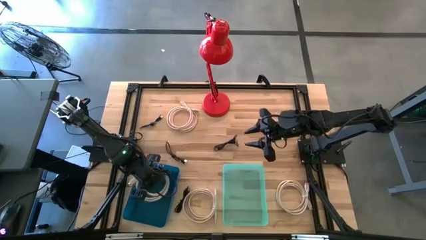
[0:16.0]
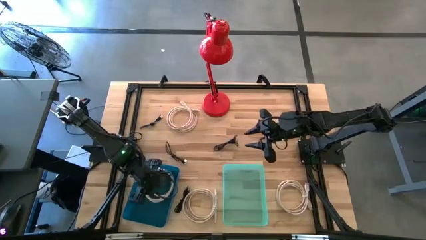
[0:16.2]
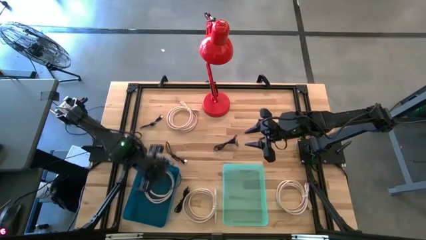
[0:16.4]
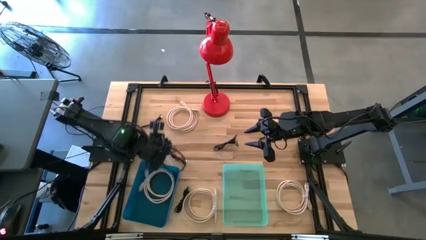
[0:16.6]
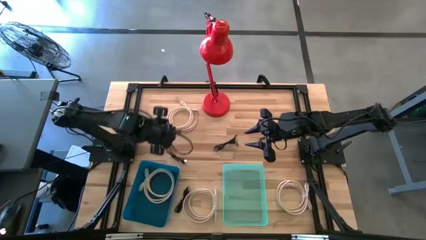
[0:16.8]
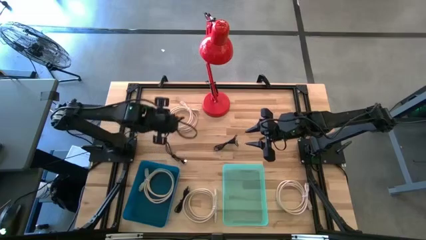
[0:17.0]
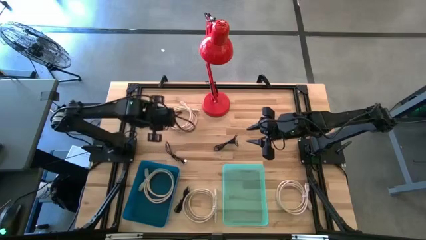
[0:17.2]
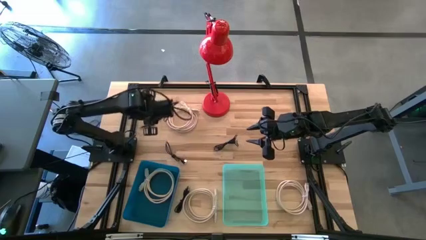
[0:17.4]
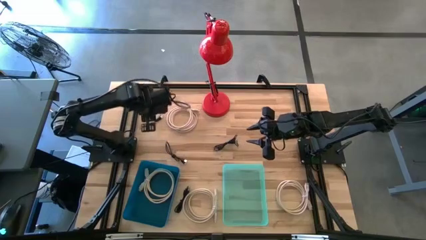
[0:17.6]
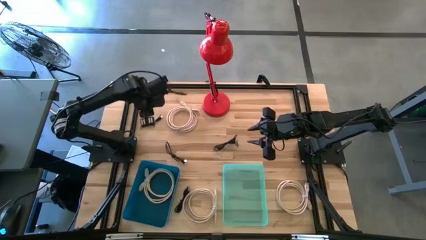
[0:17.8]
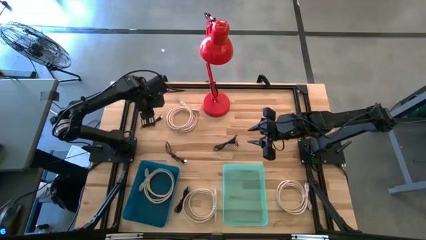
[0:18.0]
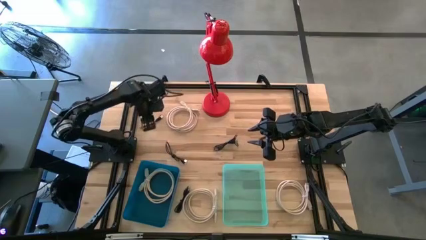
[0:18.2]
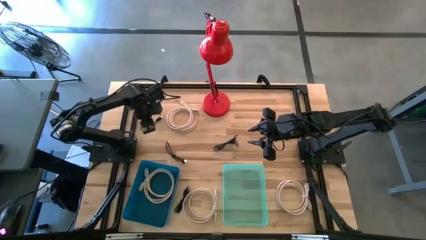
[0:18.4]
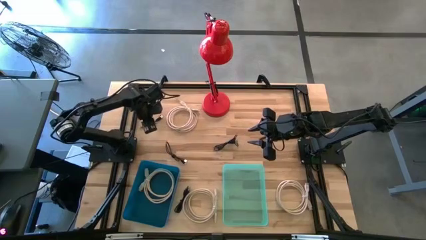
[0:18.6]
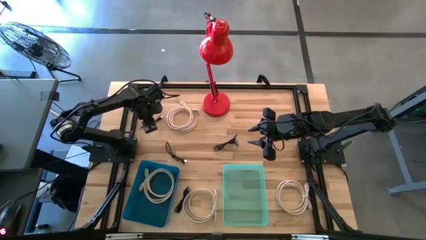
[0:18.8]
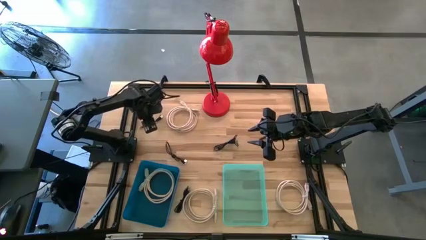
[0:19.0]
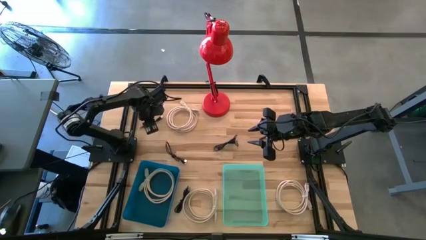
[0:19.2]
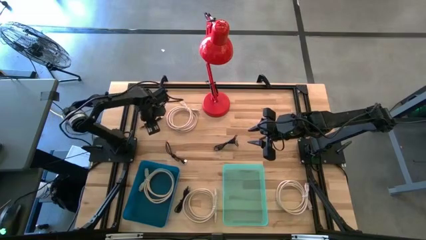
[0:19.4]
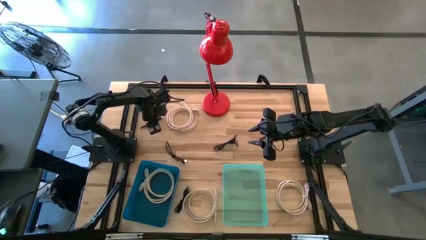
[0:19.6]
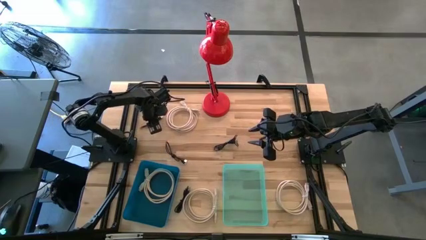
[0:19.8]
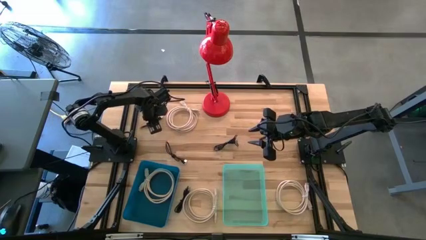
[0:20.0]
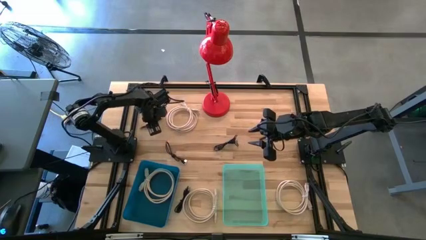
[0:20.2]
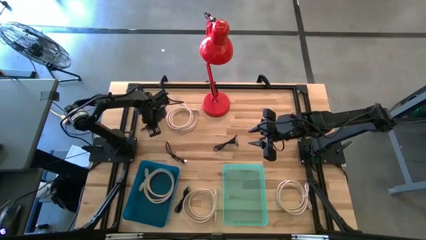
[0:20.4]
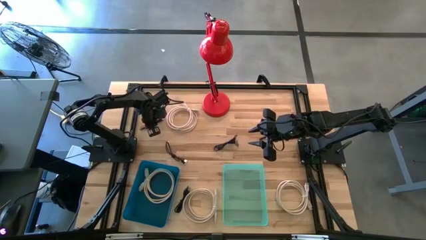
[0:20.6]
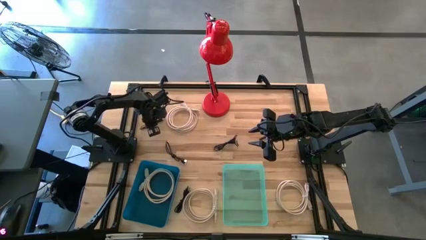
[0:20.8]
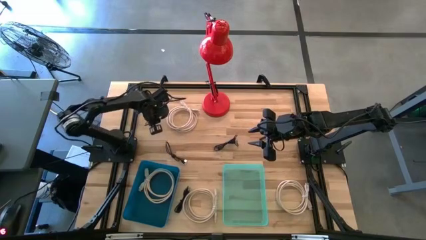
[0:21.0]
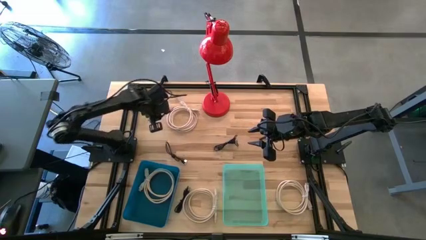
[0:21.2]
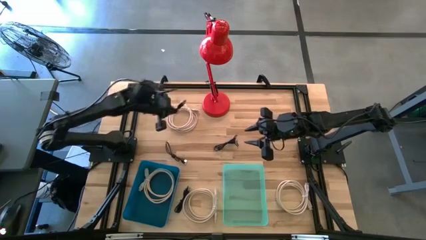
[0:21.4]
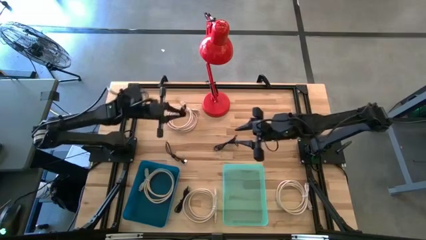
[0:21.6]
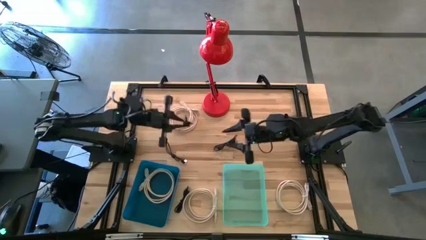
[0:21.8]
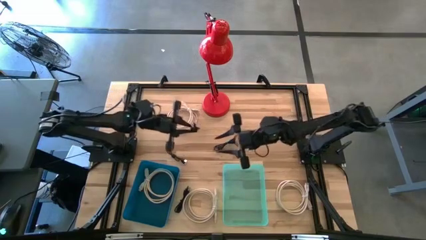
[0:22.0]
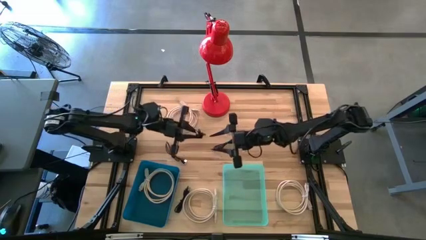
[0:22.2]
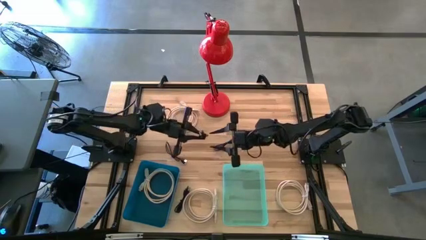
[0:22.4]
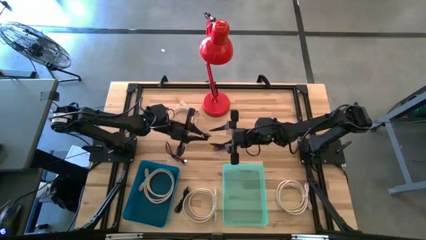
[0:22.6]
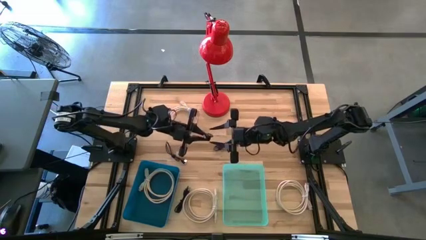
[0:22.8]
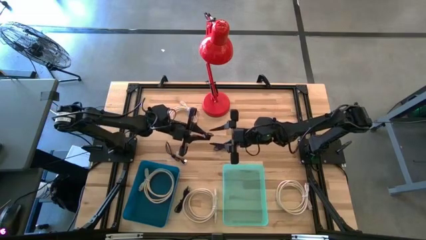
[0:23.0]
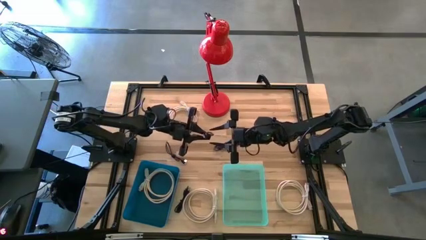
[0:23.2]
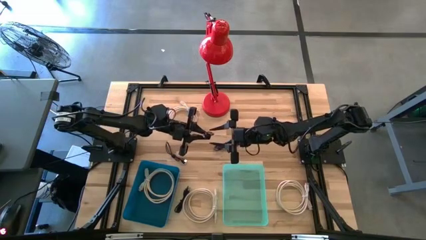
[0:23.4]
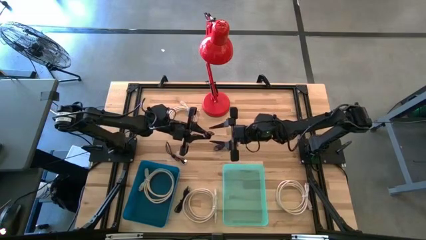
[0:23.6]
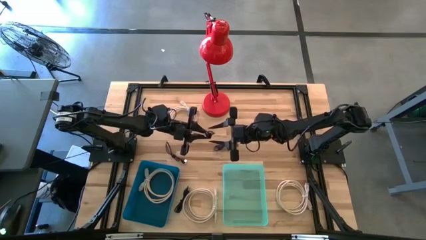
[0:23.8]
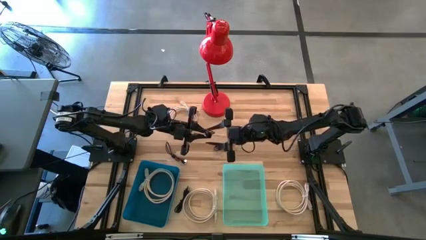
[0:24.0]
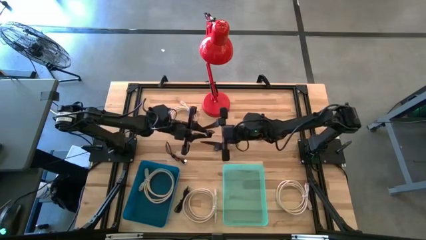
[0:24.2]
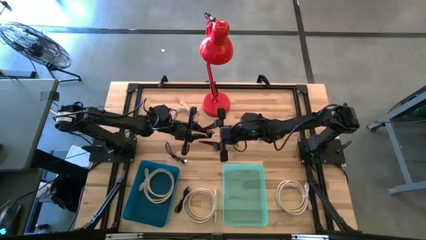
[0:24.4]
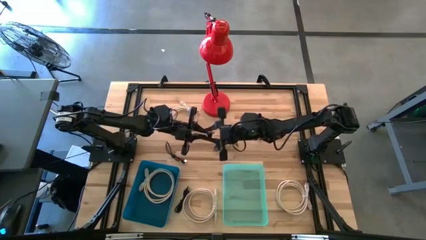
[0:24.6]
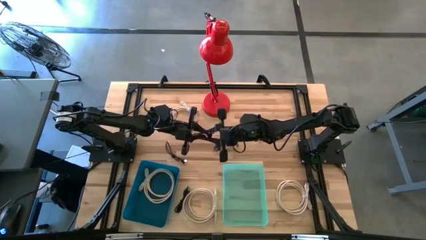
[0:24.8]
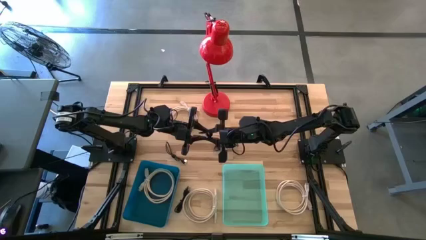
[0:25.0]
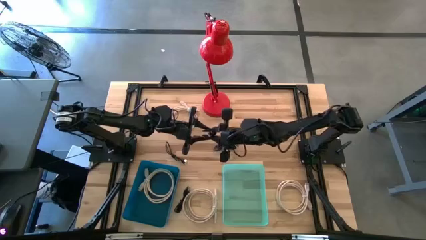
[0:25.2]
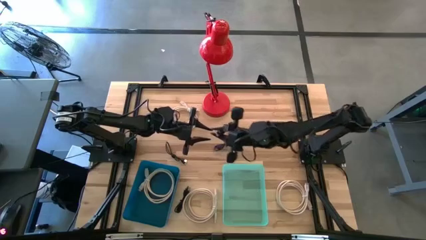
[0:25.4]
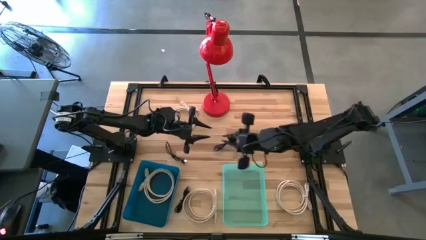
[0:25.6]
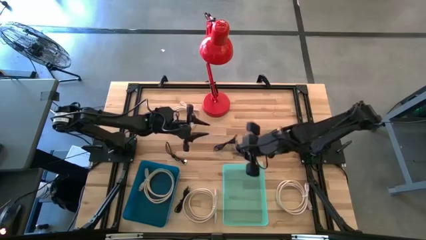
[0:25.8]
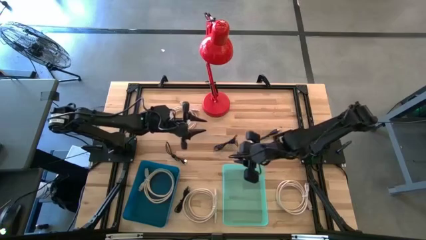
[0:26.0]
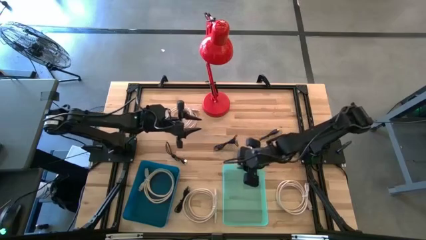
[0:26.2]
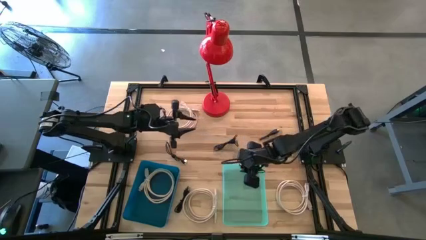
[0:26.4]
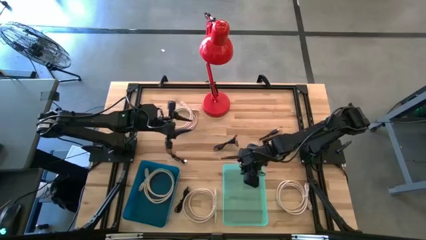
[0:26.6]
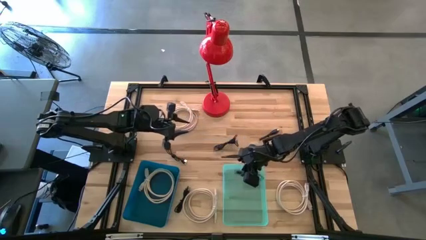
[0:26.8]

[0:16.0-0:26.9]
Task: Pick & Place USB Port
Put the black USB cable into the green bin

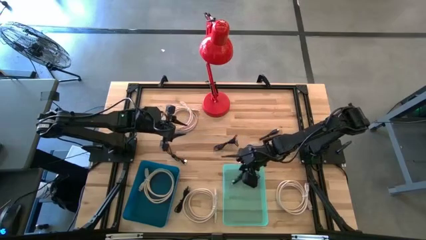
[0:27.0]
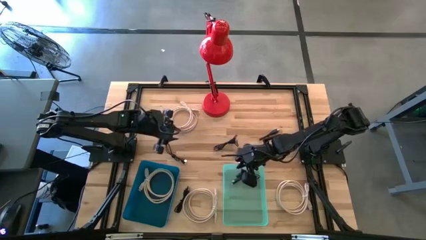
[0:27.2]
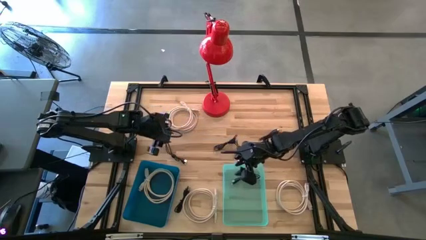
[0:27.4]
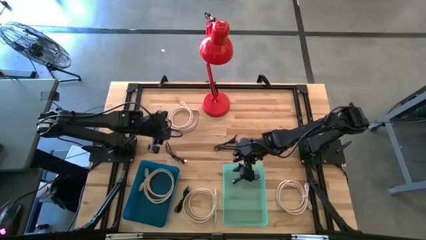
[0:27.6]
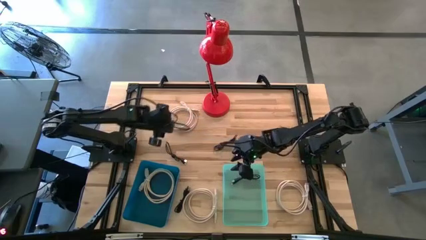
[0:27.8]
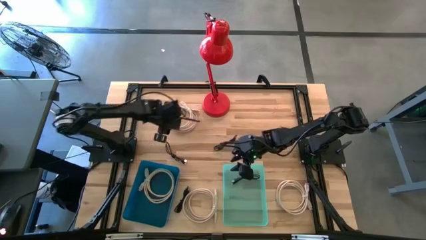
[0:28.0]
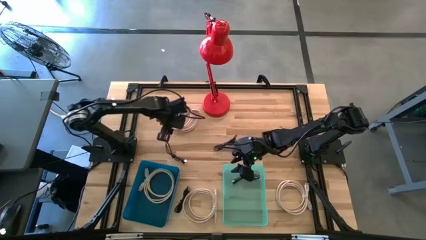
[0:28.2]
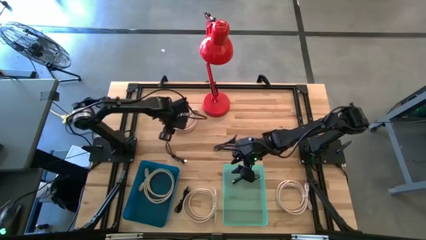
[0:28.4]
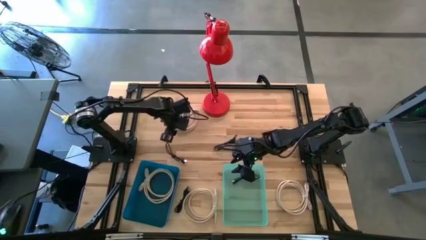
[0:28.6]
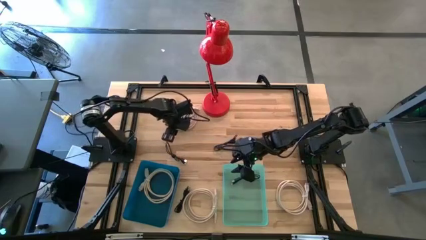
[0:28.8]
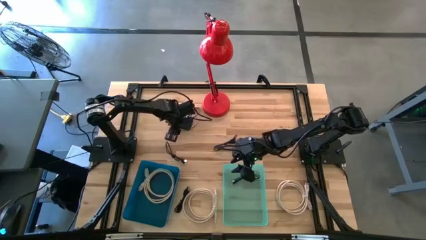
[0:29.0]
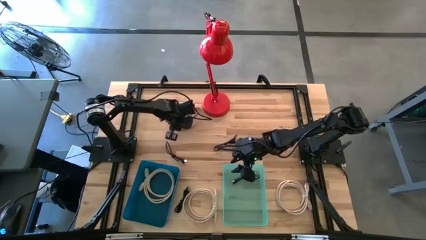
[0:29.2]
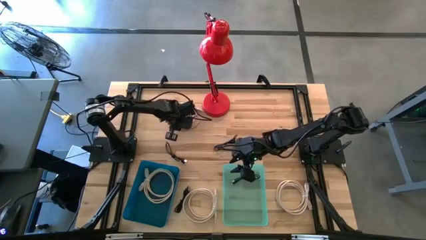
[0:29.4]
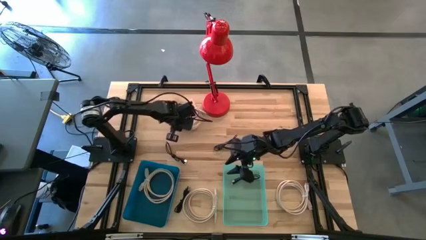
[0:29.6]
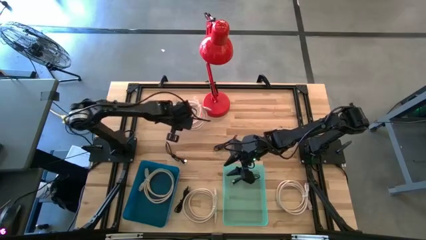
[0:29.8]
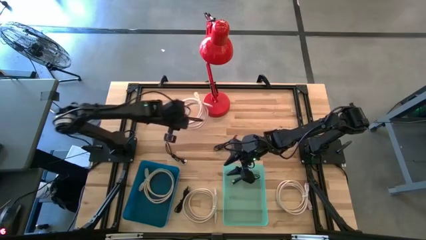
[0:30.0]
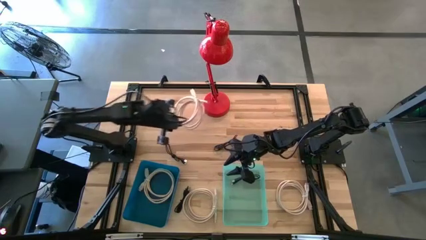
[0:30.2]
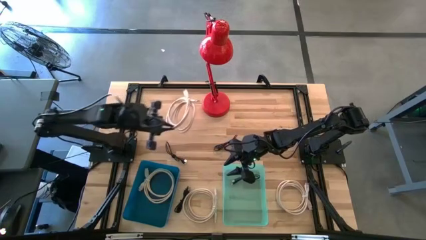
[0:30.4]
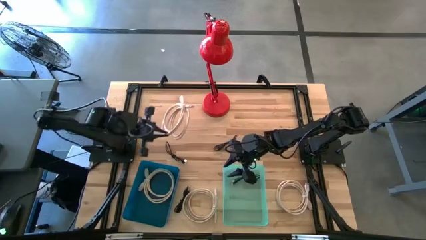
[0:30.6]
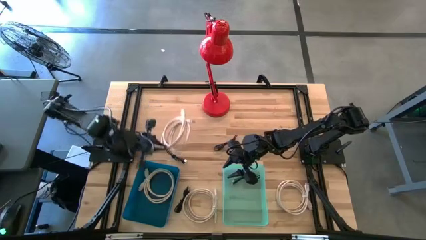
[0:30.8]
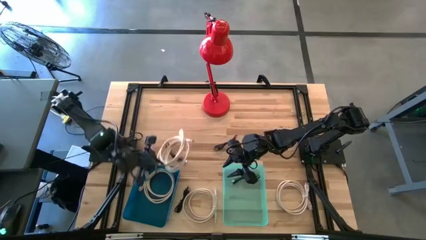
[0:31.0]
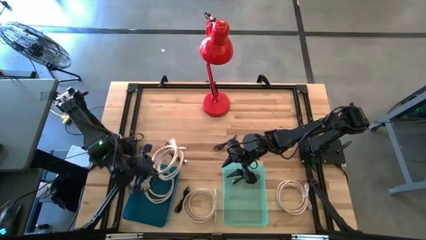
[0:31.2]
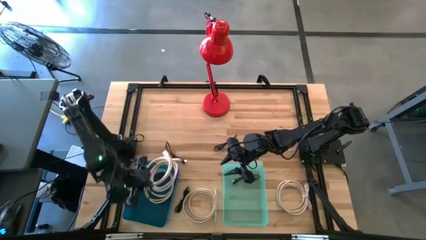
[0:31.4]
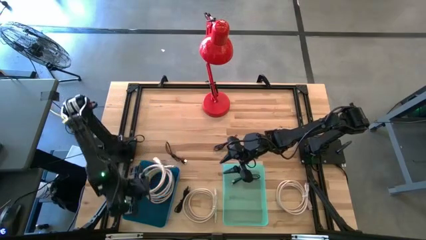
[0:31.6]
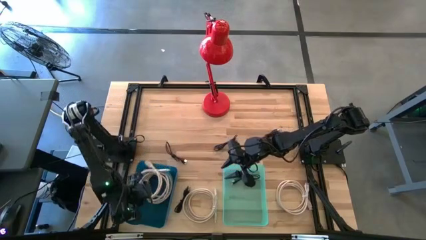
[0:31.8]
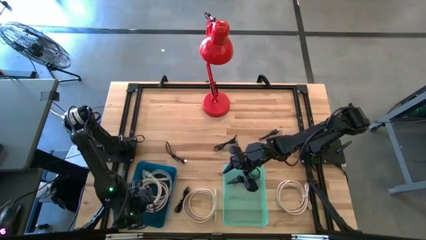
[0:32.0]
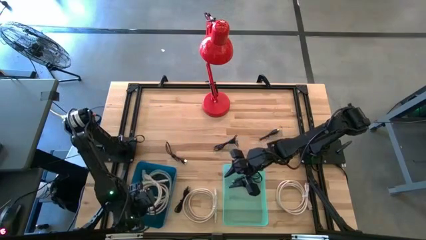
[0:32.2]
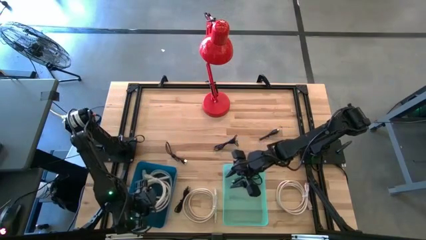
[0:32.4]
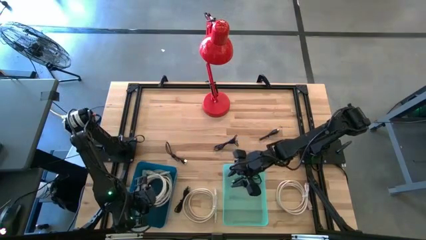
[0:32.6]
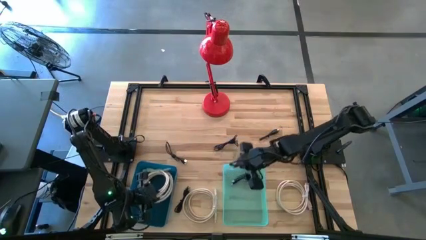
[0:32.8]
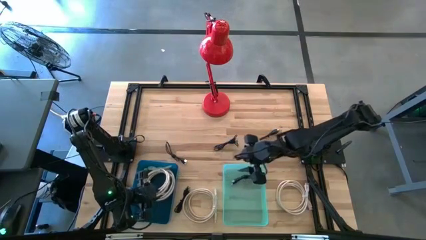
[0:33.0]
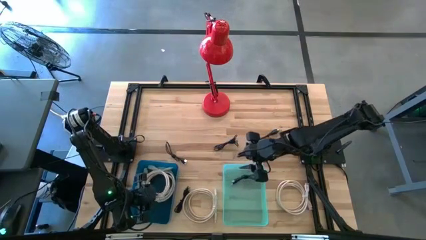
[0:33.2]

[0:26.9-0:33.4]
Put the brown HDMI cable into the blue bin
